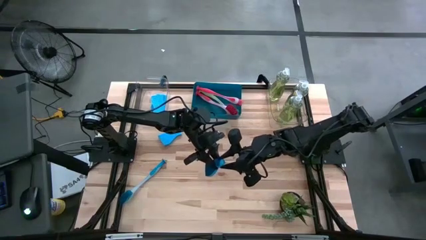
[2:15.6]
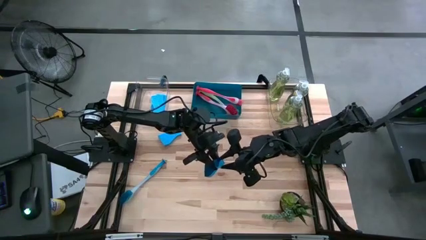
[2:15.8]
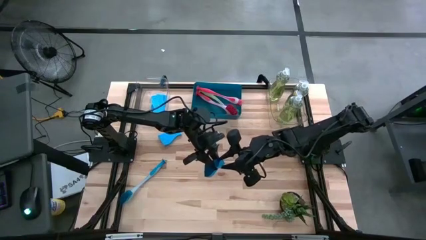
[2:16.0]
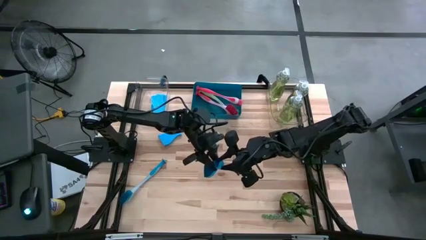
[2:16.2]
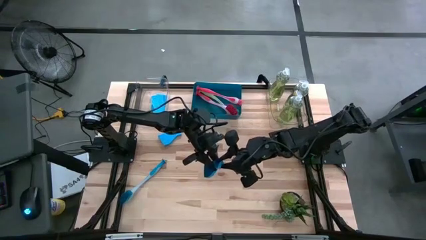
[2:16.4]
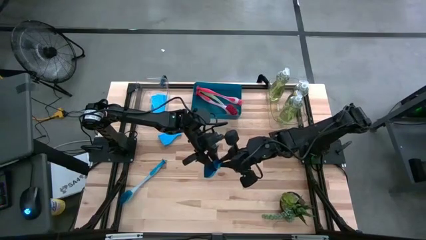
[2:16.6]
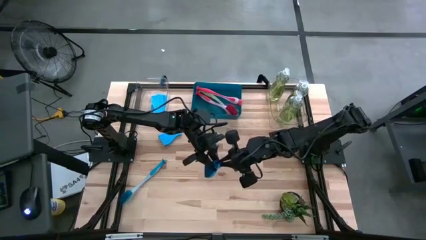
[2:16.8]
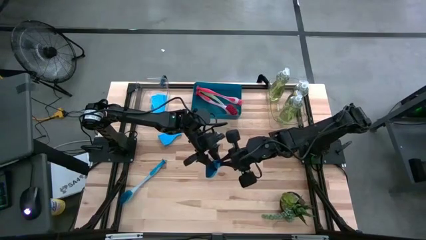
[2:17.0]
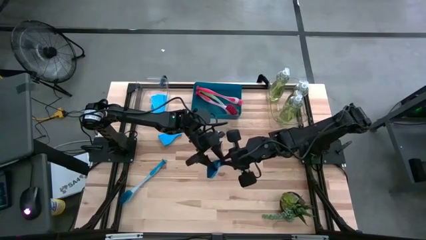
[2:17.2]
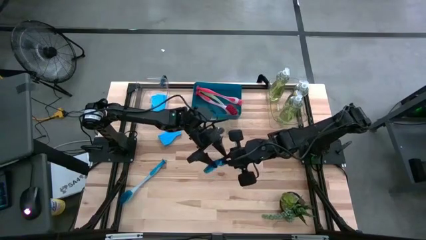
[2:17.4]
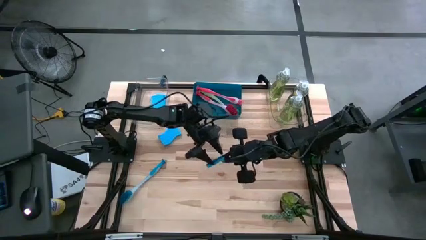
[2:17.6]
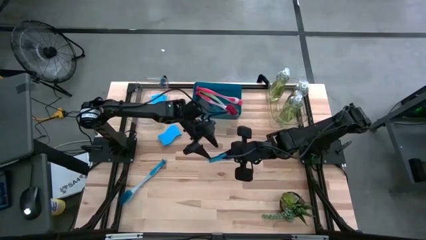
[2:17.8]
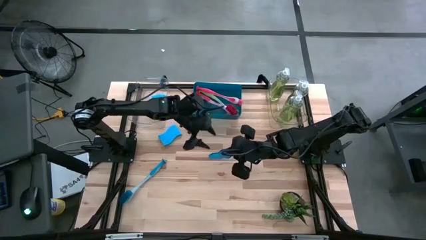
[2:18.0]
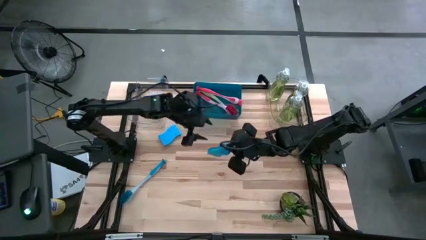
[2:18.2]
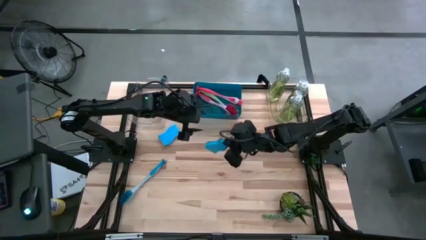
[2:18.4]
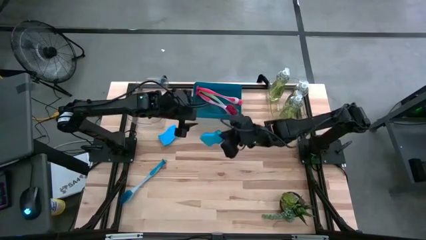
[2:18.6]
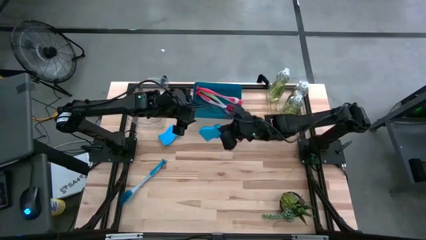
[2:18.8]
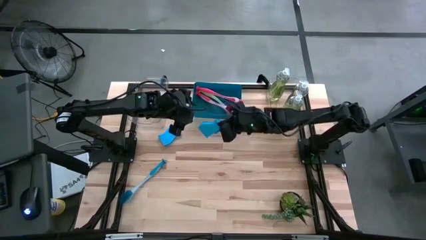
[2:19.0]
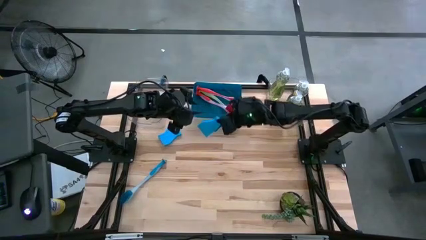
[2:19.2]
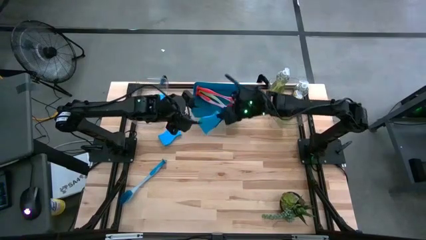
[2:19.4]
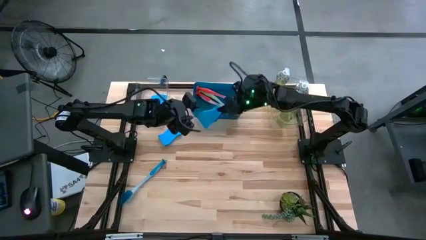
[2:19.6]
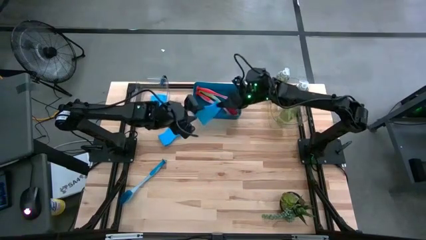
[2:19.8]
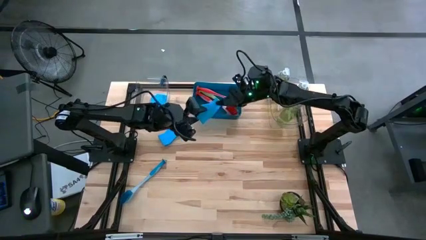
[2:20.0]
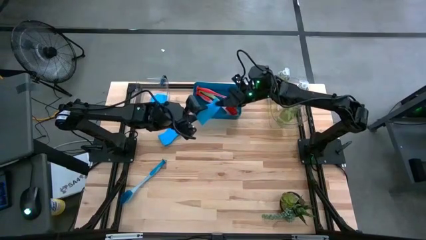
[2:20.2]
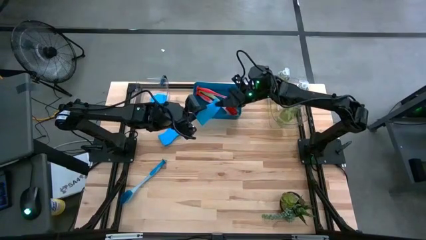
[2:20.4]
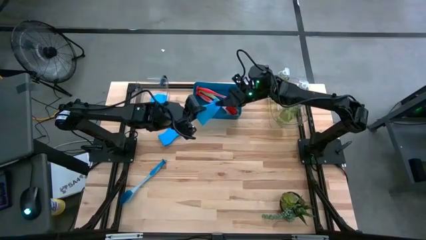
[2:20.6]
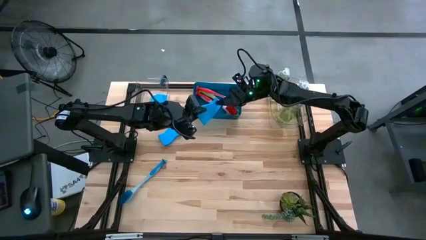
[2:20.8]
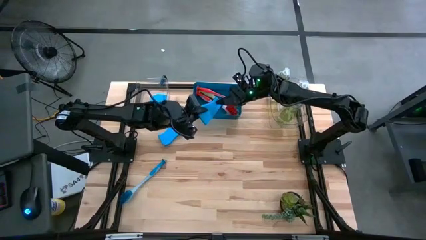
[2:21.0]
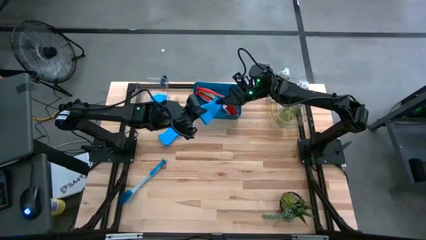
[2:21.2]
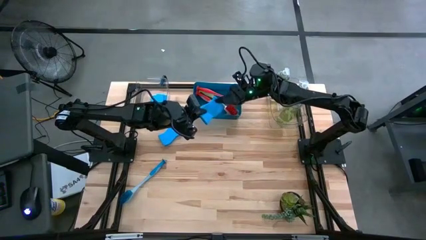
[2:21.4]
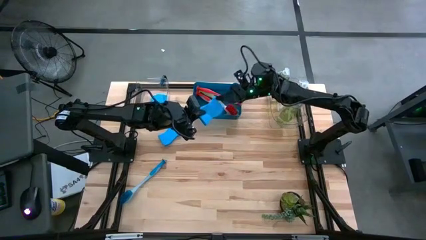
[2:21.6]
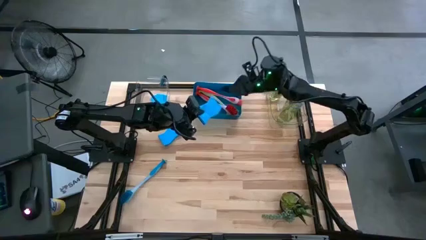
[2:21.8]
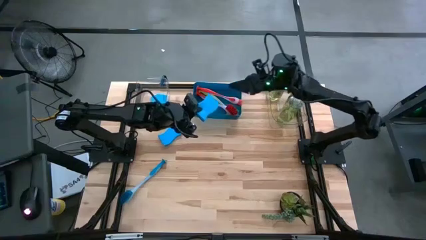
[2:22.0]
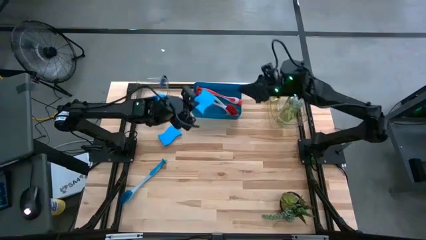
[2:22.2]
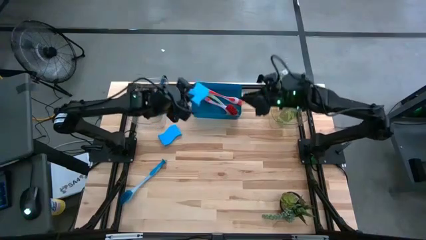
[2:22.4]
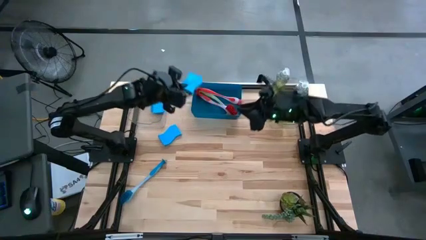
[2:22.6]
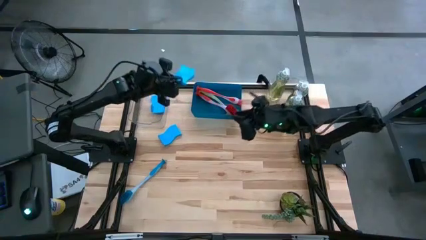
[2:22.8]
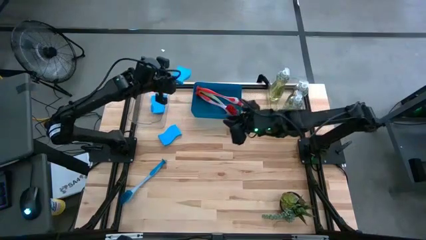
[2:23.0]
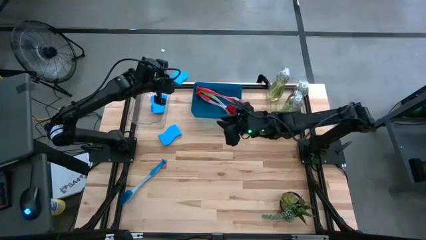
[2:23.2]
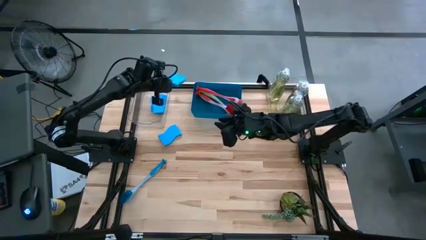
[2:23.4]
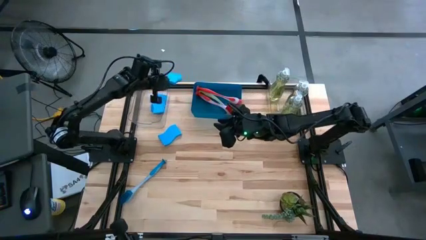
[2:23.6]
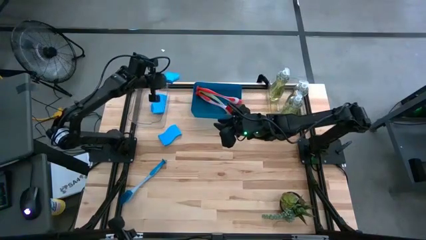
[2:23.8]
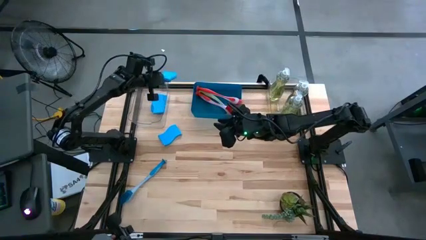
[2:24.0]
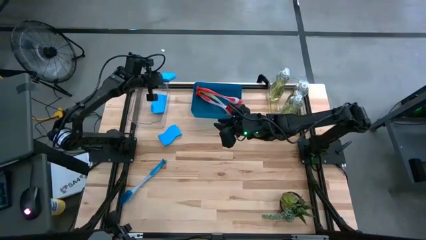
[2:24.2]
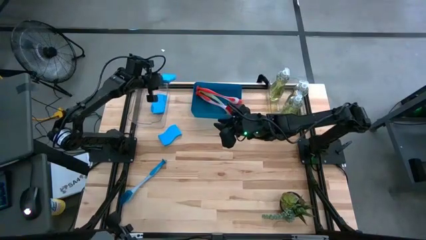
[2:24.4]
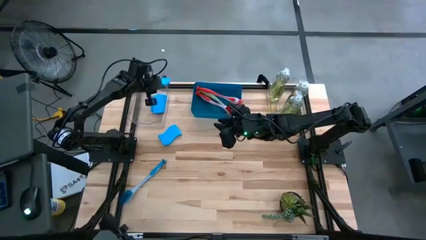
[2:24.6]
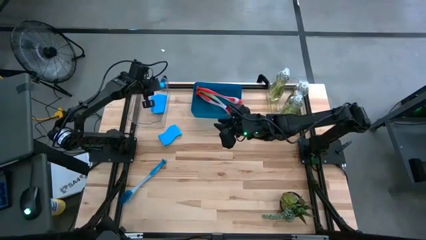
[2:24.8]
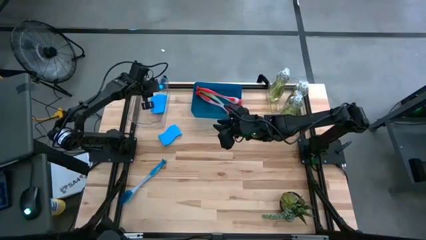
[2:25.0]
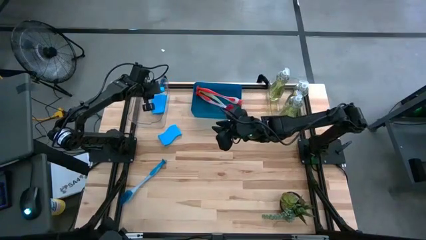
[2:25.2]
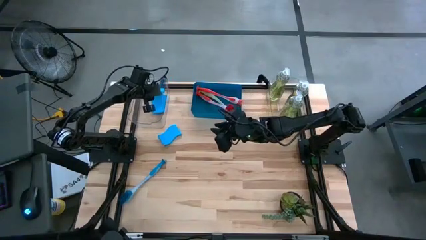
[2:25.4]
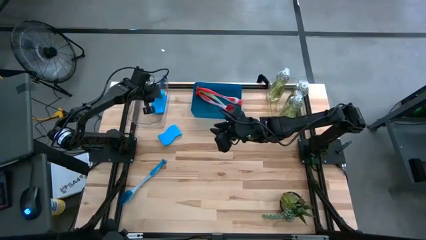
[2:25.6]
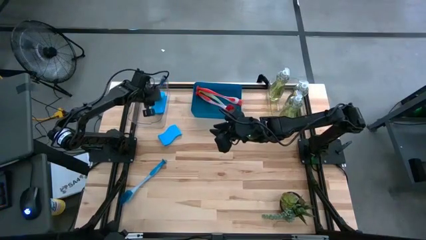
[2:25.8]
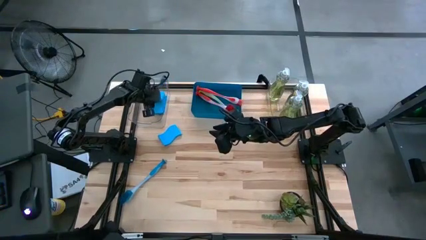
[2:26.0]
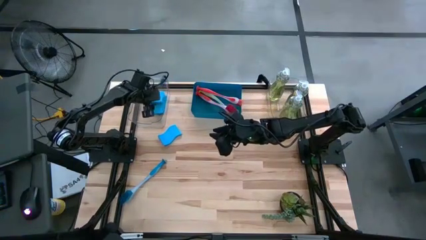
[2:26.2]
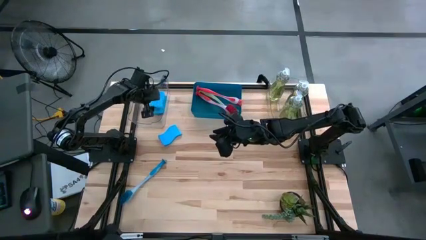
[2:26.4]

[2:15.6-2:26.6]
Task: Pick & Place Kitchen Sink Supplies
Put the bottom blue sponge into the left transparent bin

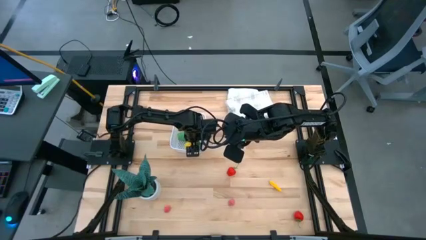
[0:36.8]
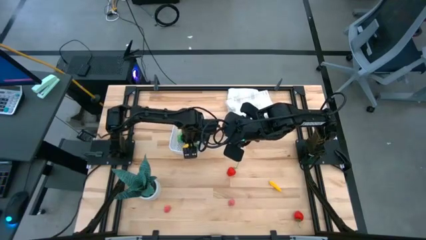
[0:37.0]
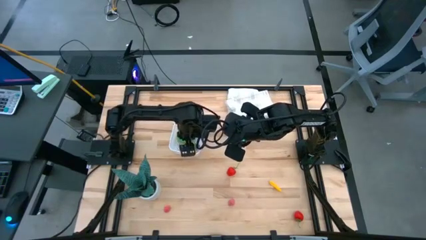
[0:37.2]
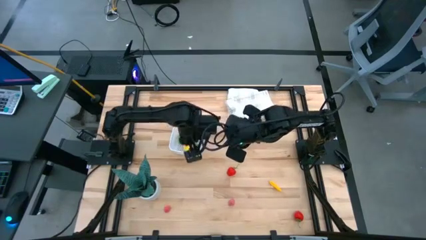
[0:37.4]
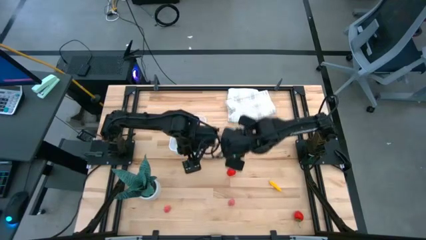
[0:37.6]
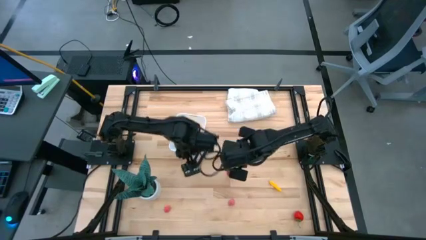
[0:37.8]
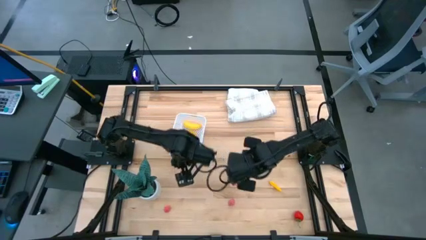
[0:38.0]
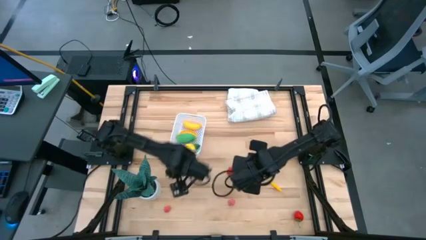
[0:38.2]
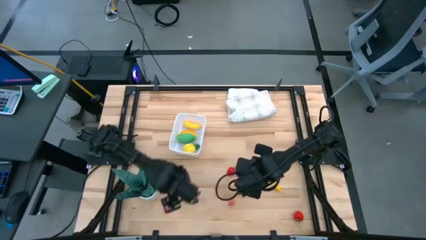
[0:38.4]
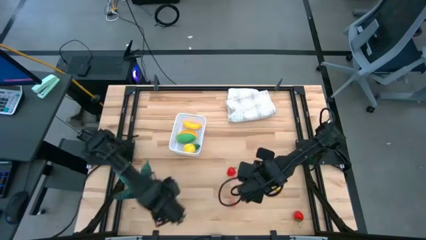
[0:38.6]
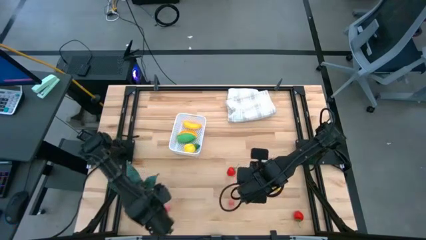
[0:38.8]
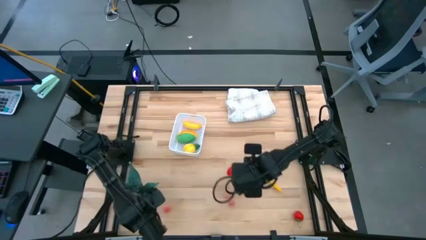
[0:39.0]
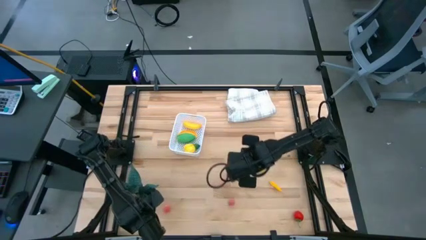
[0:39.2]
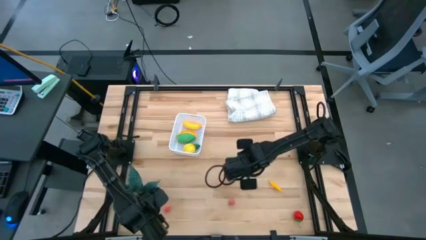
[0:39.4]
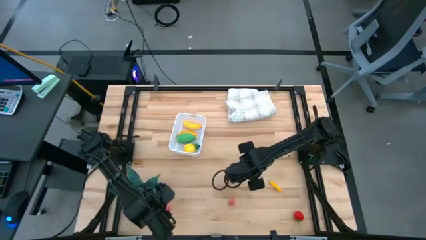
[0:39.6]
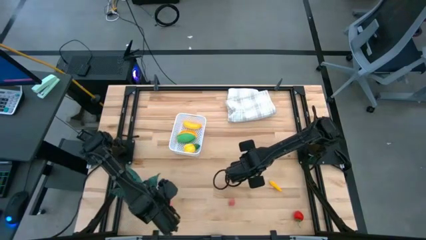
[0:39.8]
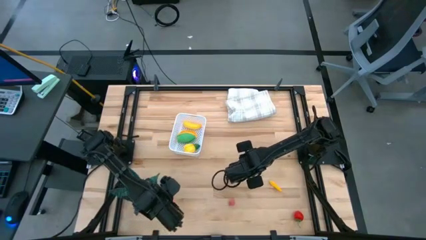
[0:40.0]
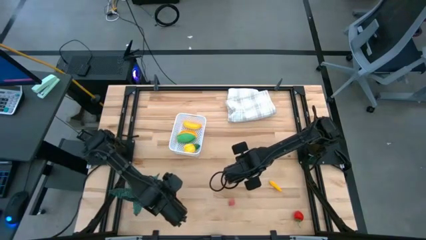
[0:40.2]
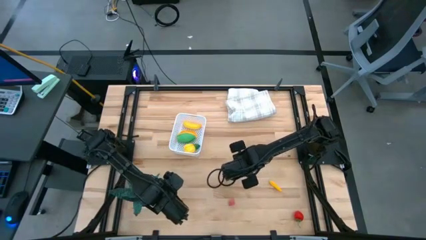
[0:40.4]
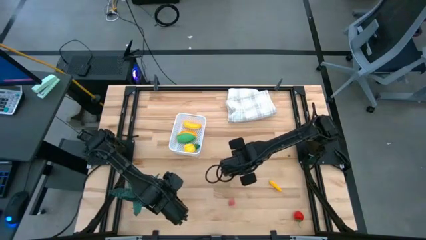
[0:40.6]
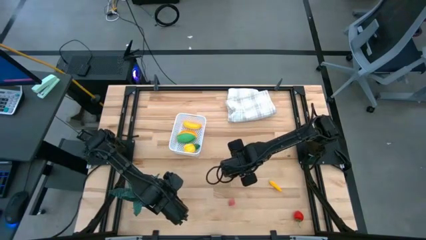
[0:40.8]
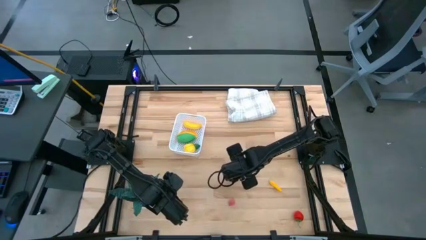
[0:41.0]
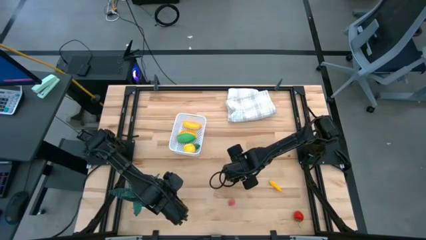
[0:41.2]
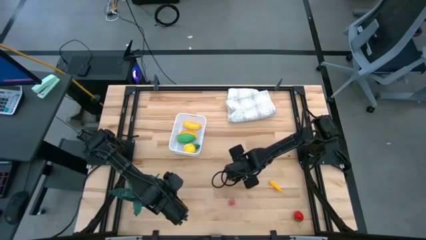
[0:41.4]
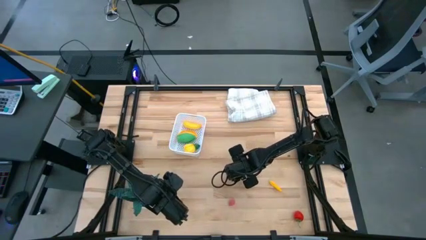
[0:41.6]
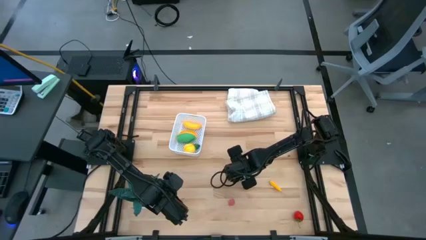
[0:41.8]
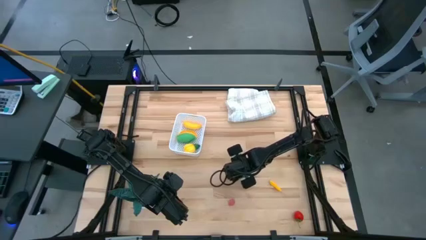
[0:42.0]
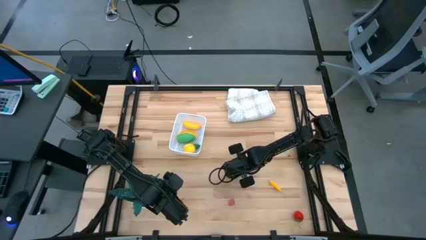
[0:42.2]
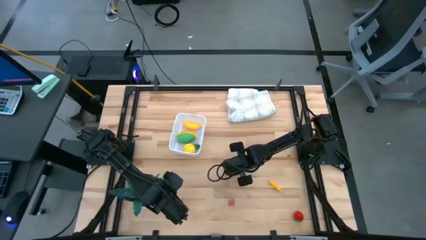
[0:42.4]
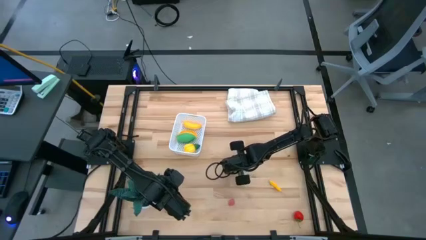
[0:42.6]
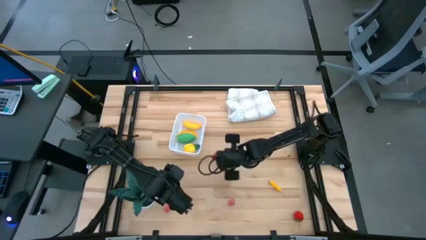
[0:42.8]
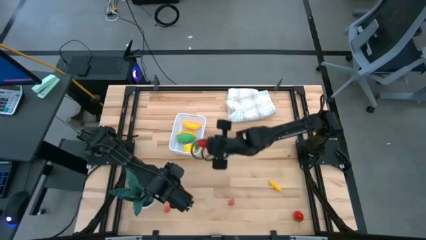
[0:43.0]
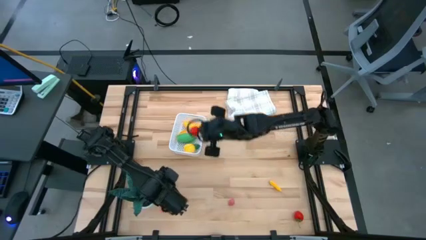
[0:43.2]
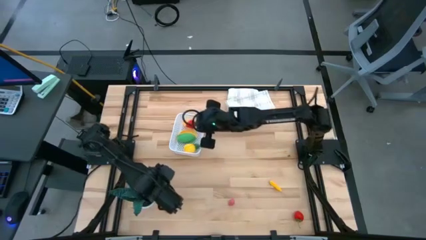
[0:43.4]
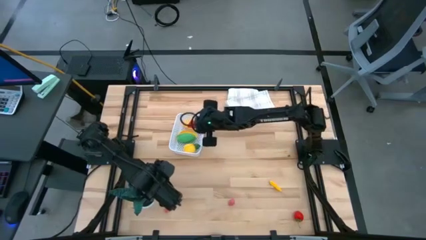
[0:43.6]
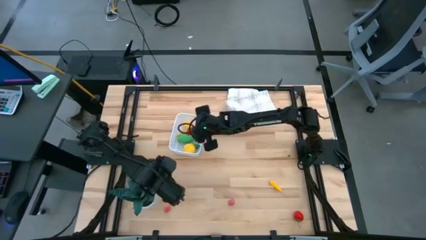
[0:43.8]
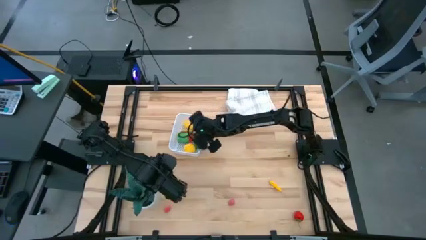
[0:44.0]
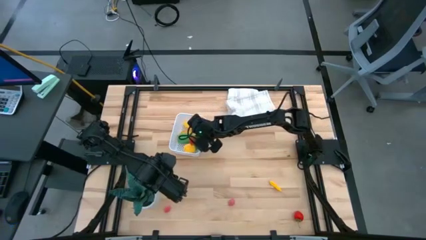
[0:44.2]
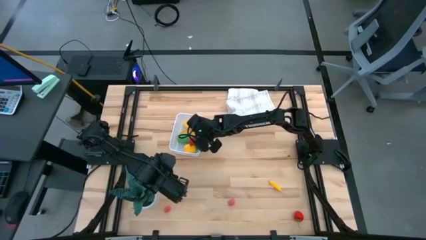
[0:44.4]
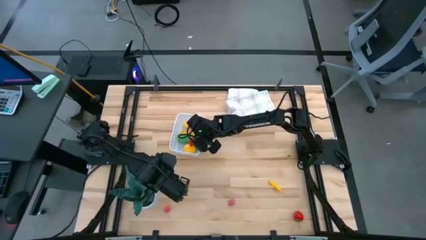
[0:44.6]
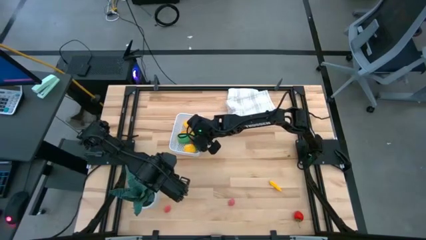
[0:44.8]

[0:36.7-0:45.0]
Task: Pick and placing Produce into tupperware
Put the top strawberry into the white basket
